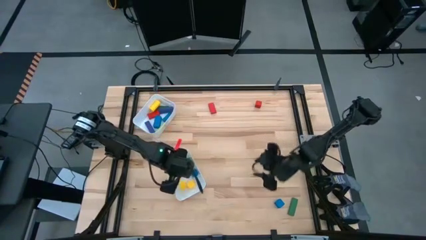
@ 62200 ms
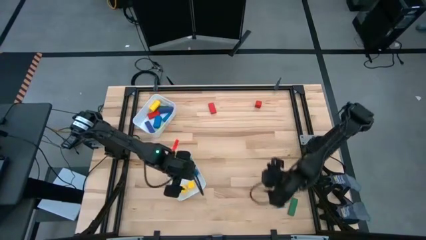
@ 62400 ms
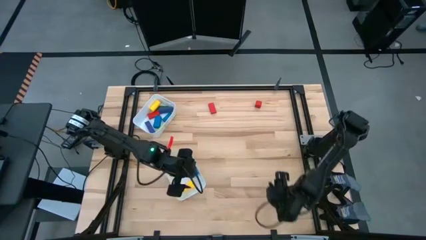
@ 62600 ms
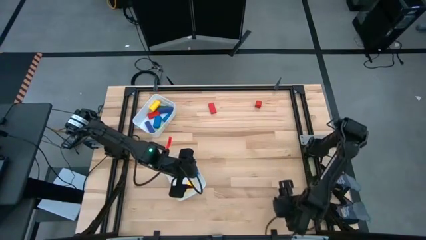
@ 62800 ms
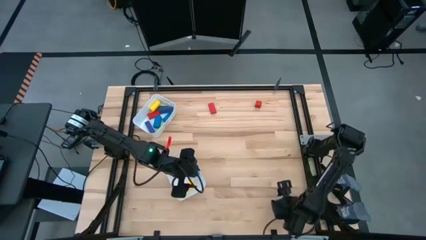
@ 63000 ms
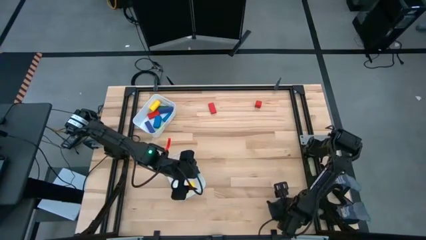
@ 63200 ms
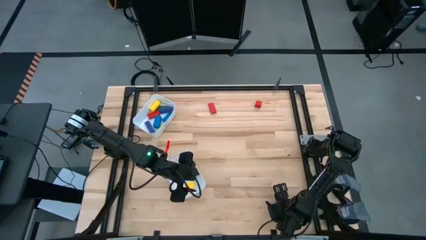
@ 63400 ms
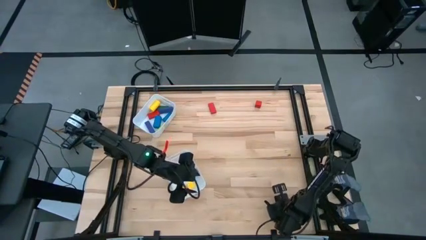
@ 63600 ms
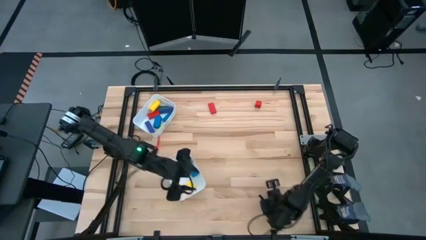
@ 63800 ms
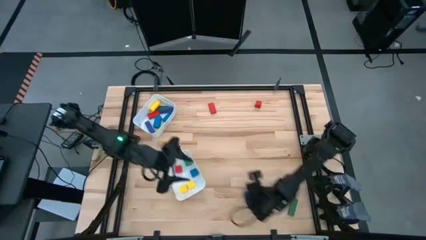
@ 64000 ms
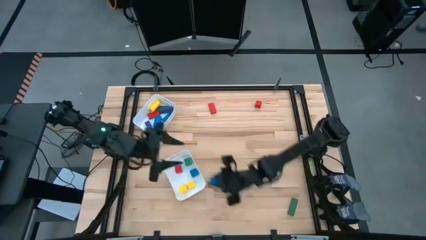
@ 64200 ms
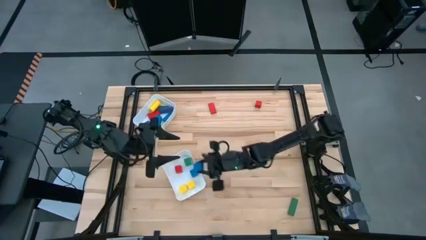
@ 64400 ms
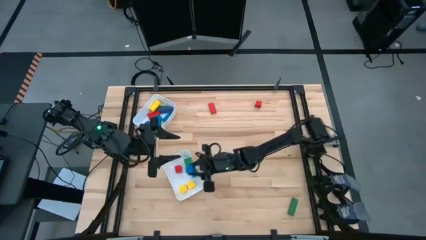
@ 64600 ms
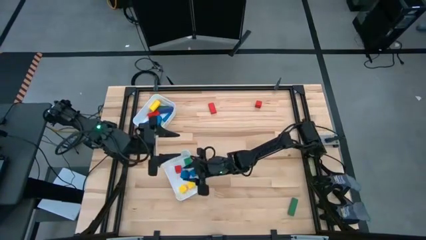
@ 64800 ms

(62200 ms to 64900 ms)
Task: Sort blocks by size
Put the blue small block into the bottom white bin

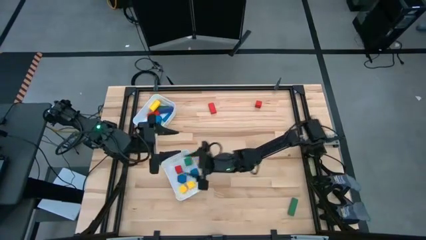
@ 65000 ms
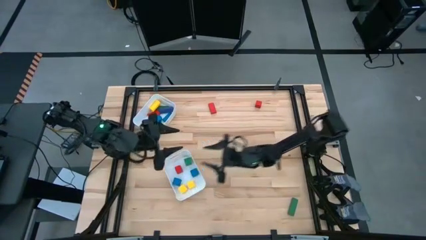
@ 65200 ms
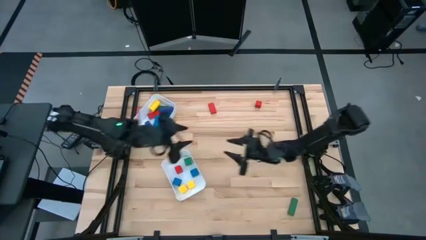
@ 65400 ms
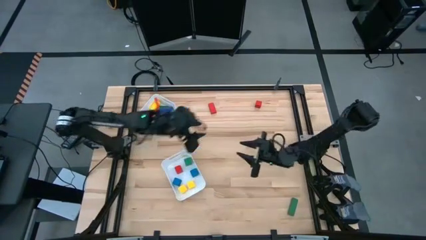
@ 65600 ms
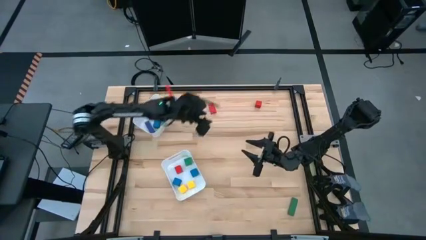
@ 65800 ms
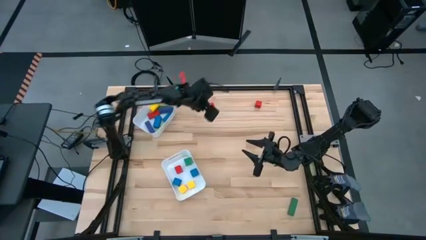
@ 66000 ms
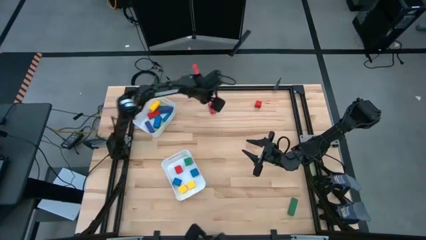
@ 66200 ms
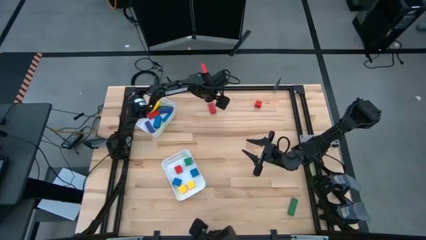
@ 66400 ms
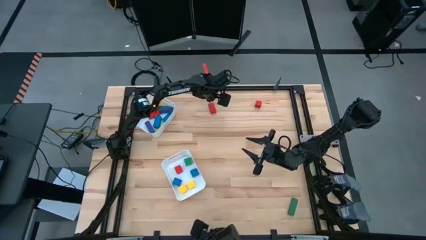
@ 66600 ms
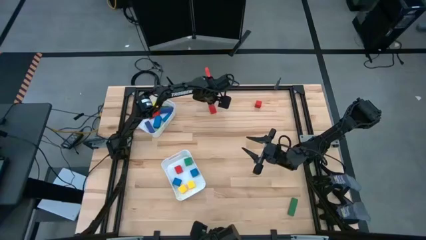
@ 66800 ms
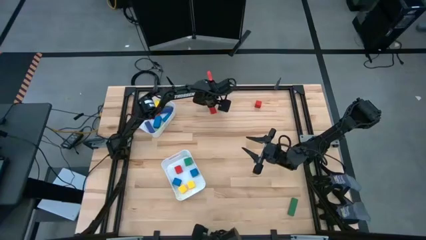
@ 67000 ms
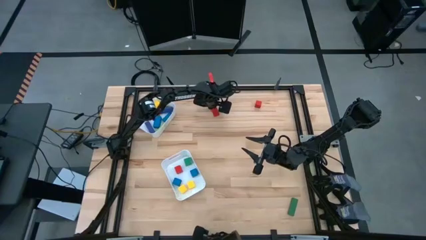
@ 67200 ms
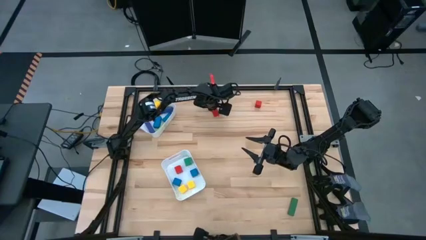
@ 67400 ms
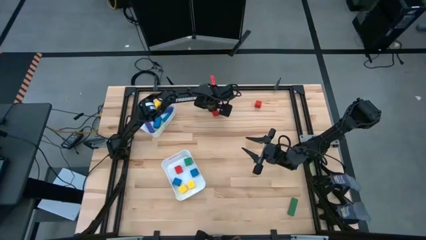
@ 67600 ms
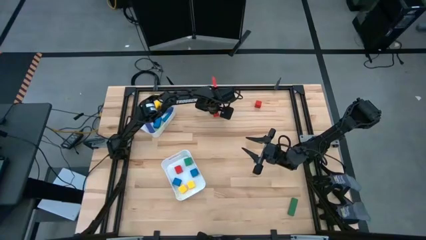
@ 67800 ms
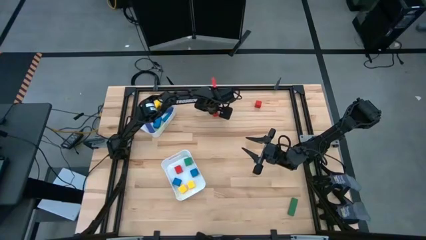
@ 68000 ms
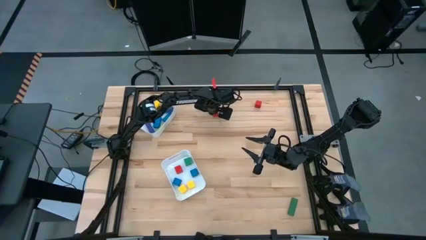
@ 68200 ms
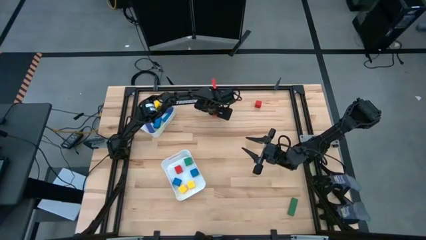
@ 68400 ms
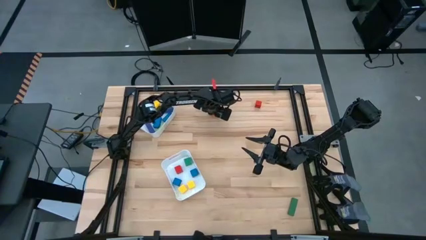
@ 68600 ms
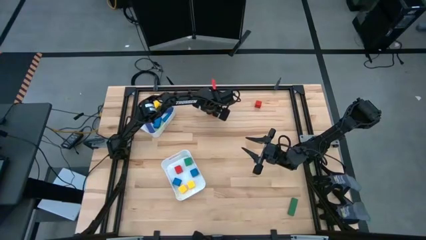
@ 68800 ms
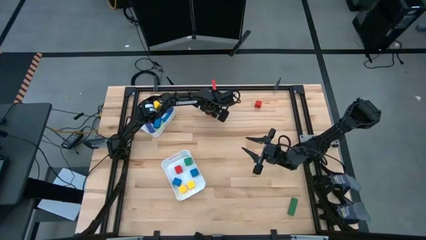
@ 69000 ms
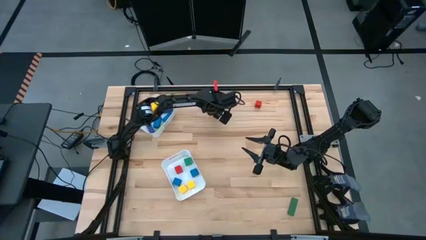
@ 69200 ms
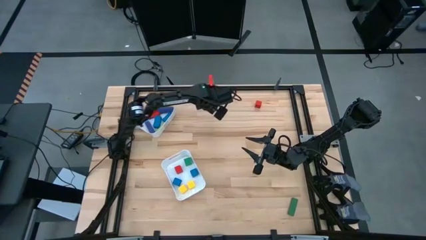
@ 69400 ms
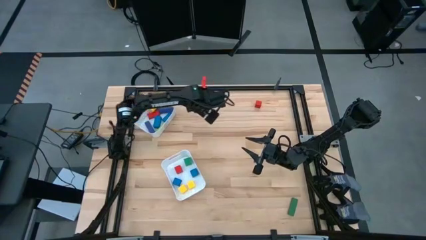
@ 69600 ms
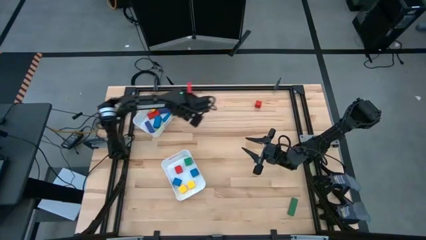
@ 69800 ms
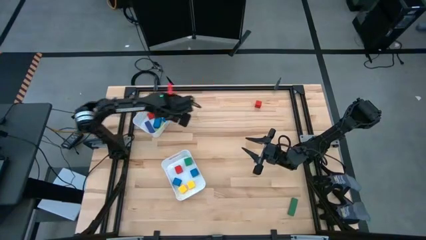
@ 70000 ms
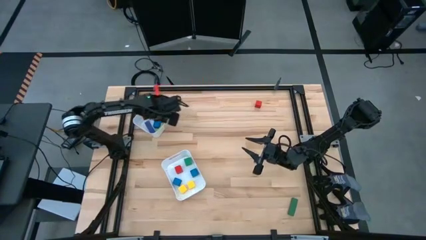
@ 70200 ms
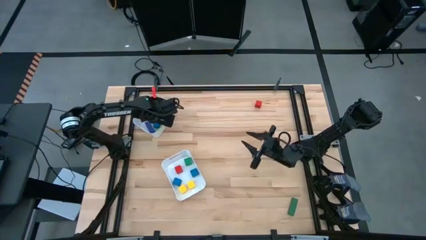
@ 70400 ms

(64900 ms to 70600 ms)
Put the red large block into the top white bin

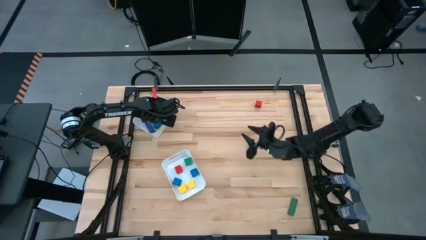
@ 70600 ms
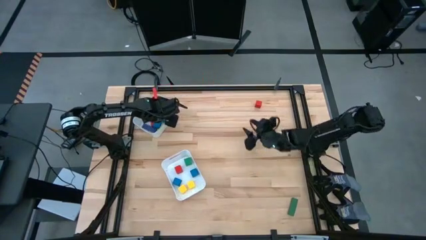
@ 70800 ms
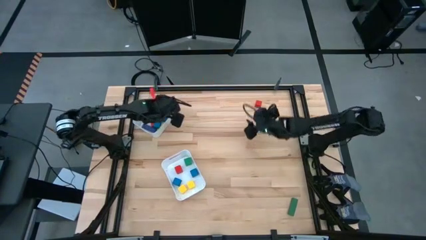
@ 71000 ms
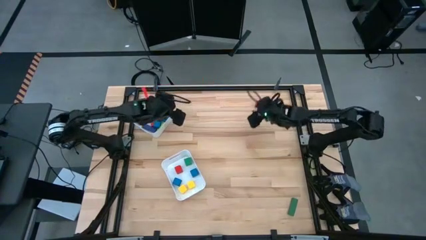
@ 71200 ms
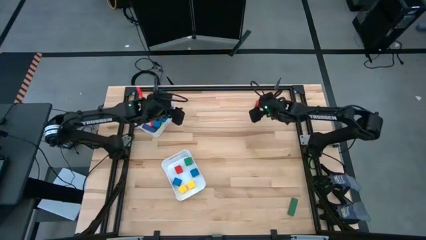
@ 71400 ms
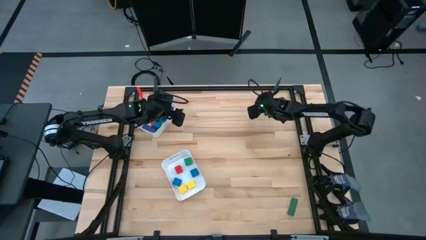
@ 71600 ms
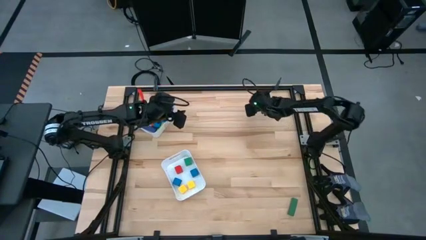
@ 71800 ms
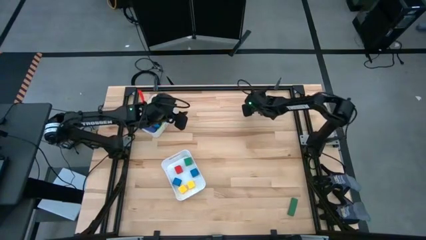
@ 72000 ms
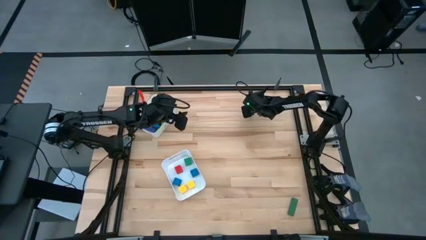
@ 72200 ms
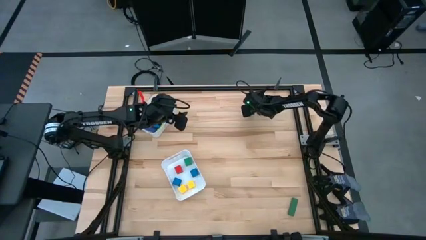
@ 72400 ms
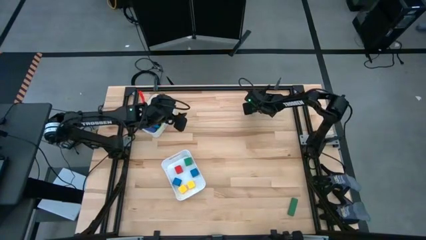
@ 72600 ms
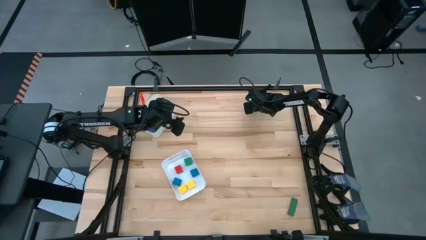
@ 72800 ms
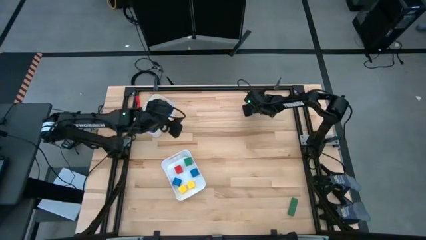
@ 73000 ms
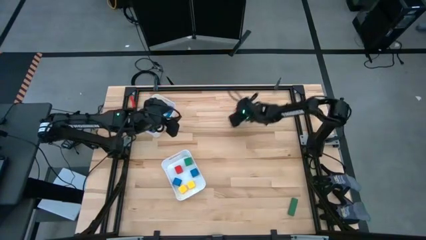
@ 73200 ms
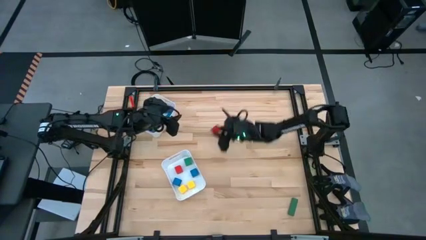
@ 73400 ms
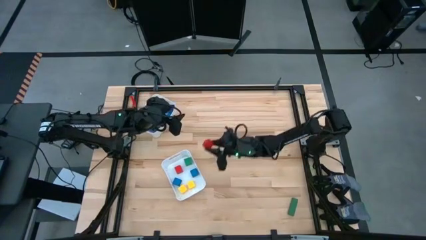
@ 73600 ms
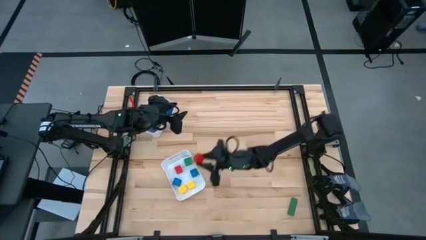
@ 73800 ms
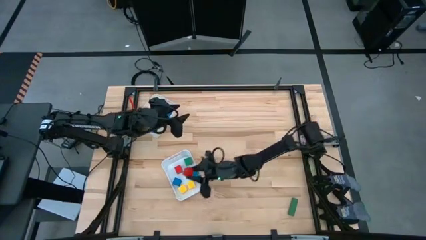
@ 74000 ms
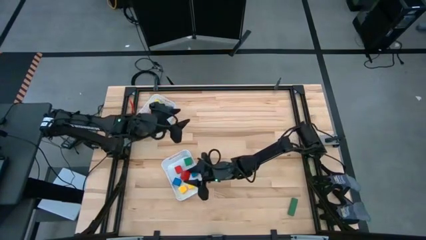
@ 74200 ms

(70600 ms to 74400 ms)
Put the red small block into the bottom white bin

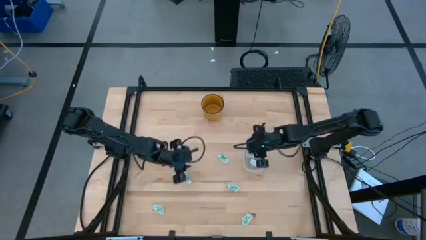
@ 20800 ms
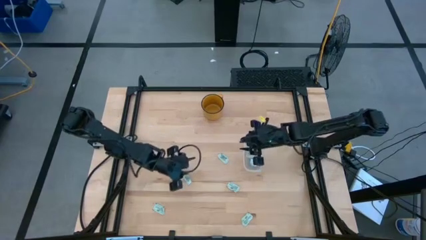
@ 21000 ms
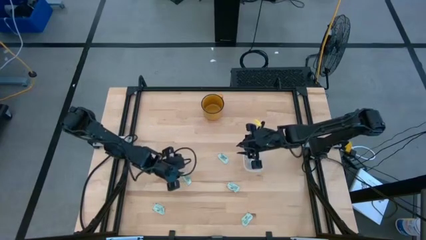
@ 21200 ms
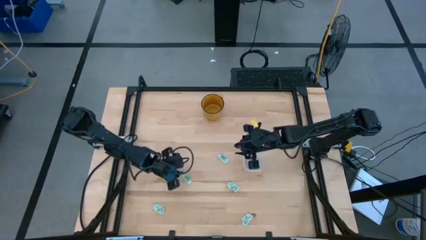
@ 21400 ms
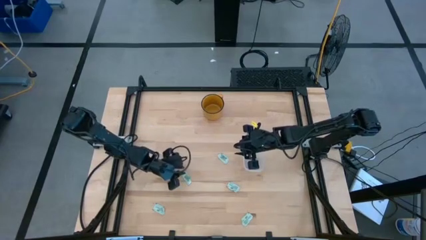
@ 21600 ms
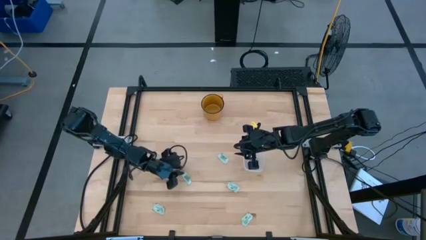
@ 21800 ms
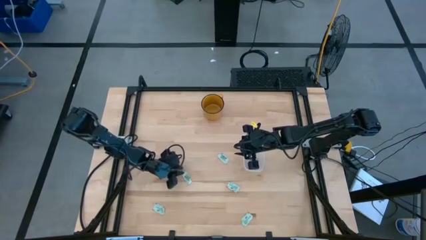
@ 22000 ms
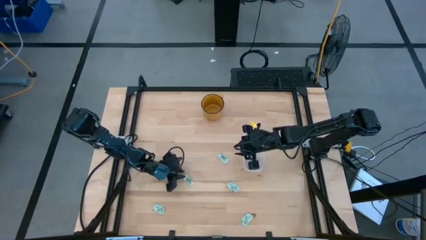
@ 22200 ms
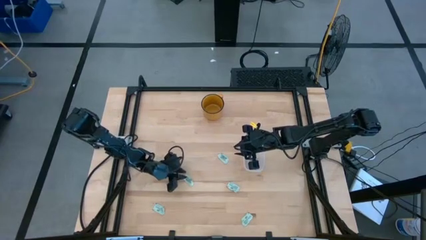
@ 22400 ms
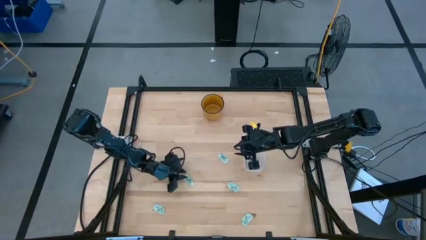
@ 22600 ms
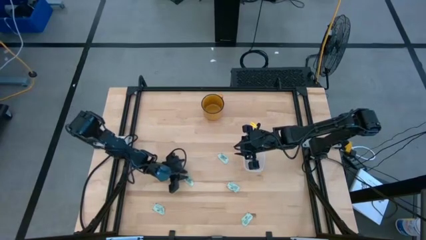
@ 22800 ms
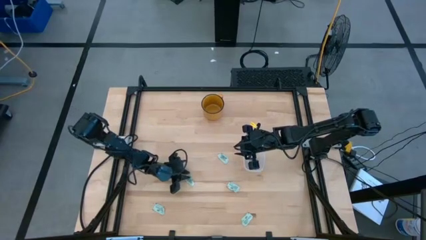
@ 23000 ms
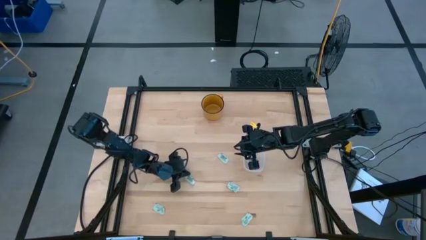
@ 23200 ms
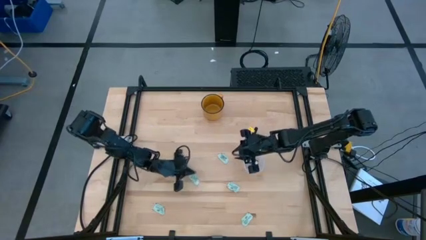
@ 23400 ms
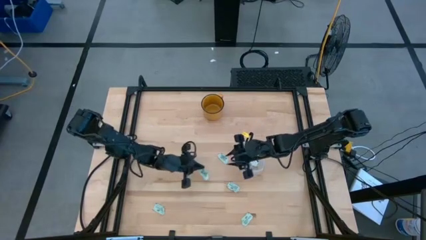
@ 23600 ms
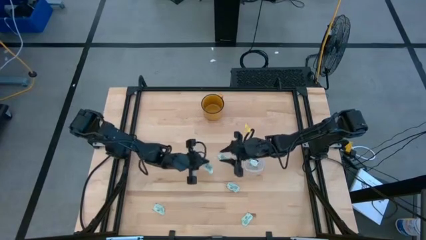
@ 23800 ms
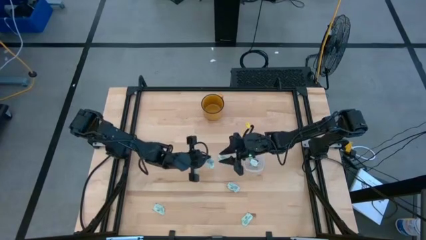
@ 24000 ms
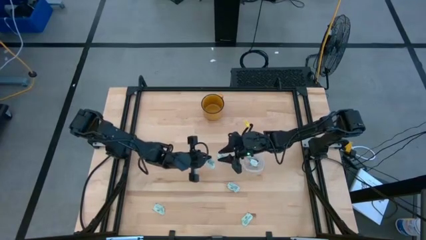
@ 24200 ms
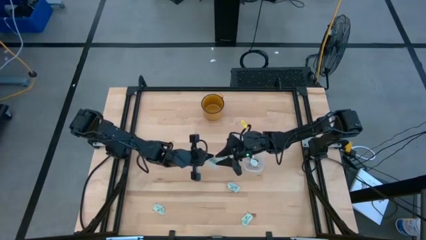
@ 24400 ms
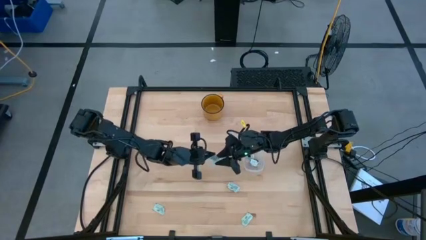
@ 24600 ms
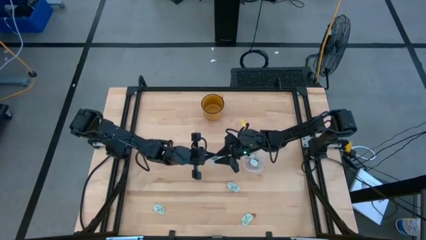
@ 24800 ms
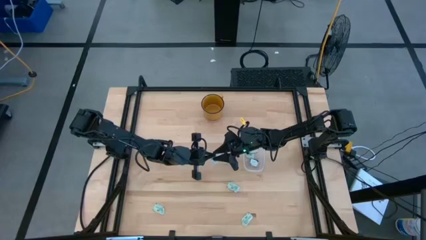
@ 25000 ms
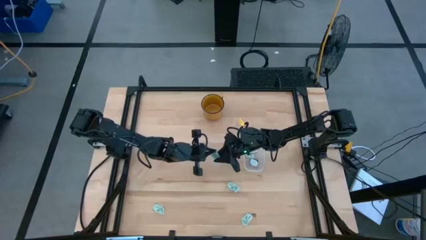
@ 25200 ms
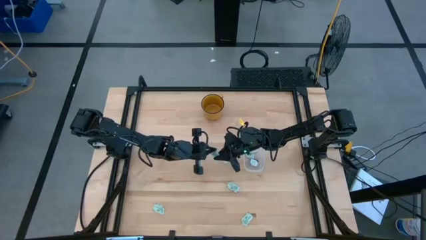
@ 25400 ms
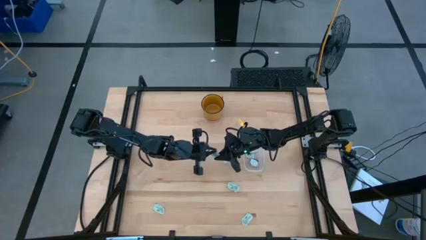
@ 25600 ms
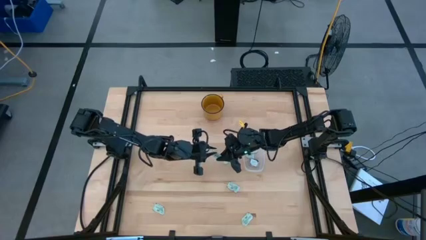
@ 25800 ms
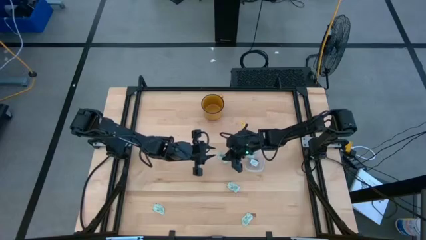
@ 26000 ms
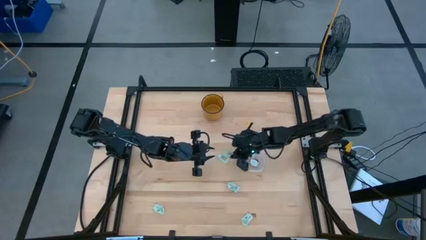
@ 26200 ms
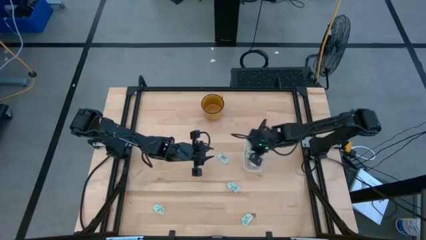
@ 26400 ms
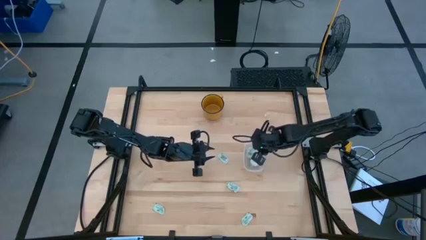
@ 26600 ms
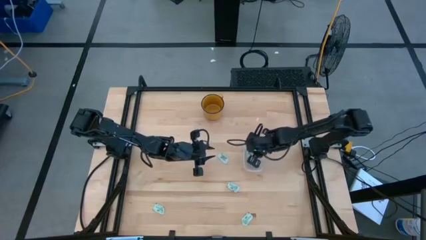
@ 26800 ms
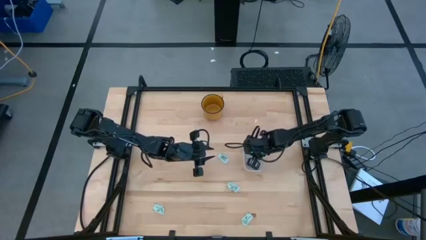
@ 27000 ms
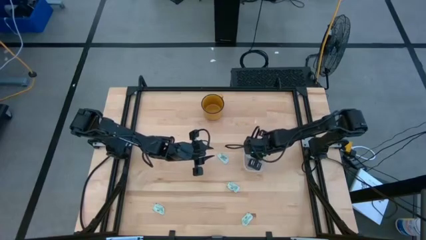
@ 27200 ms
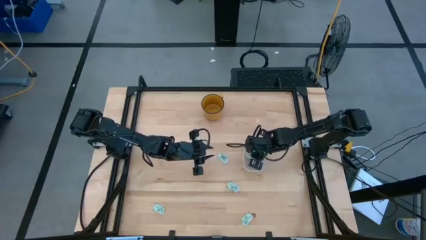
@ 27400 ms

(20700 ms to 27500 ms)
Task: Pick and place Stevia / Truvia into bins
Put the white stevia packet into the transparent bin
